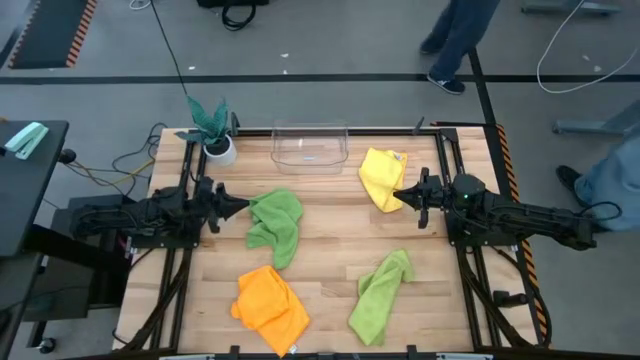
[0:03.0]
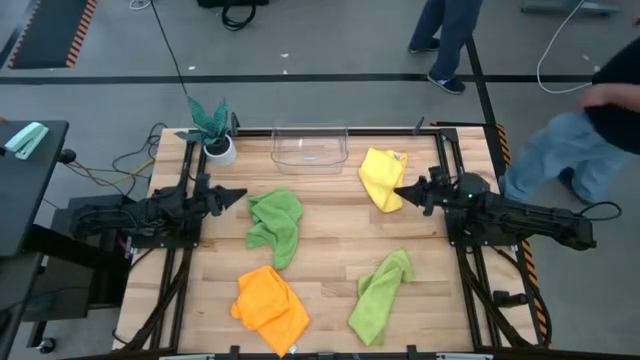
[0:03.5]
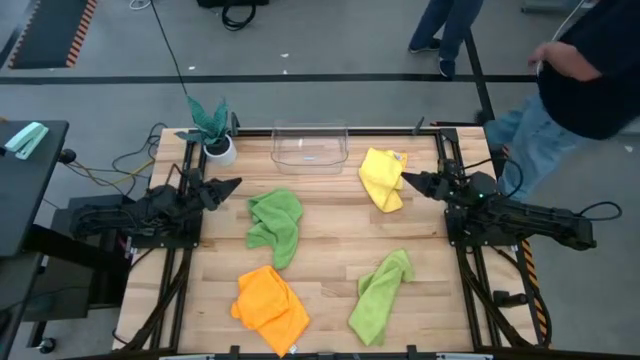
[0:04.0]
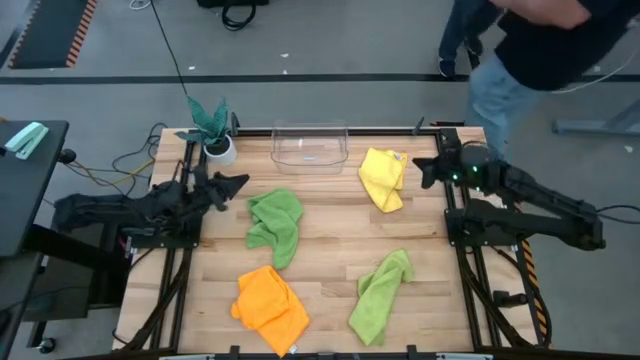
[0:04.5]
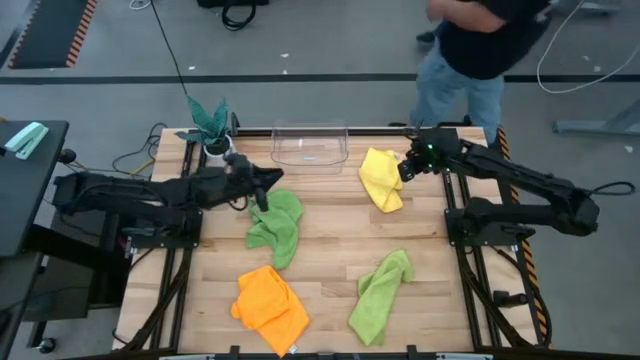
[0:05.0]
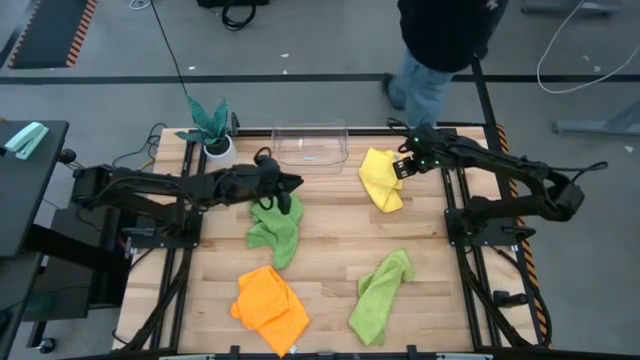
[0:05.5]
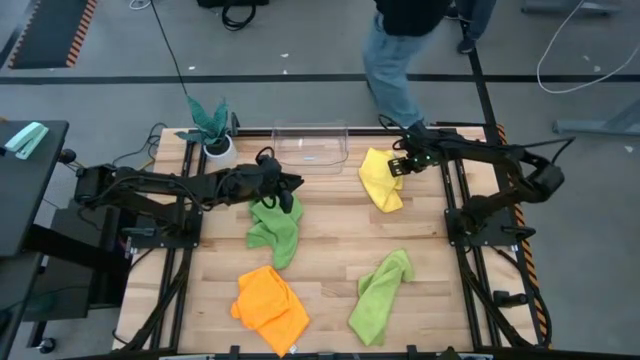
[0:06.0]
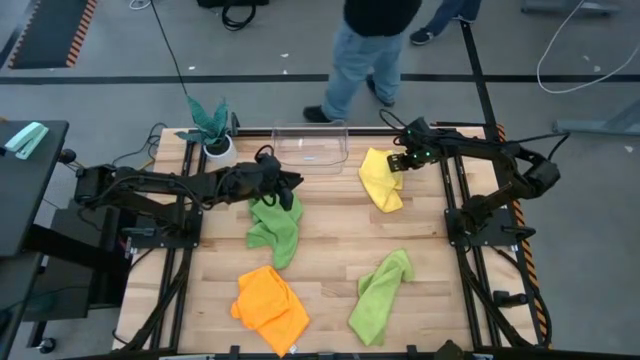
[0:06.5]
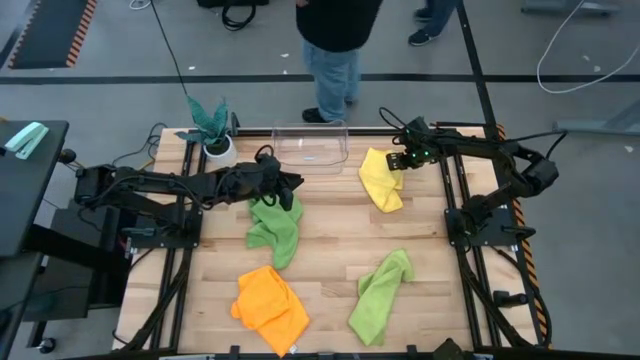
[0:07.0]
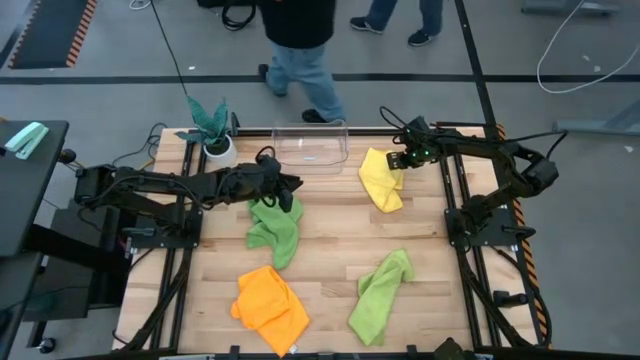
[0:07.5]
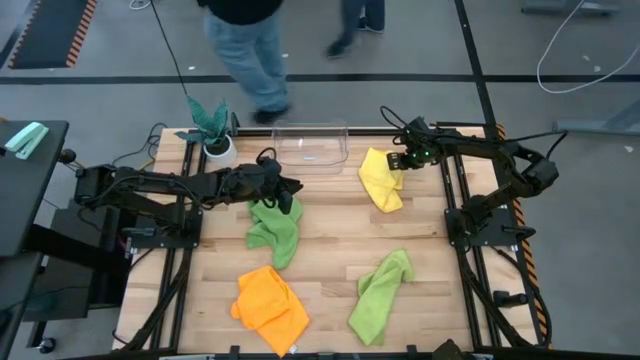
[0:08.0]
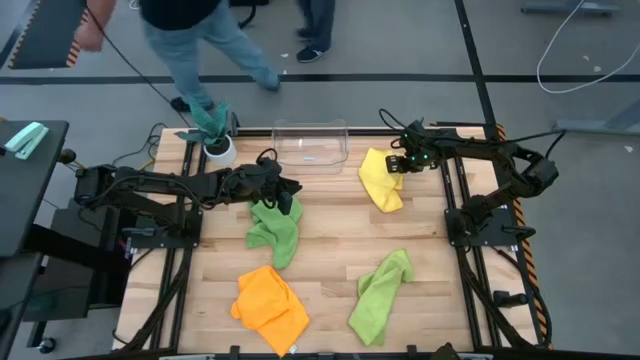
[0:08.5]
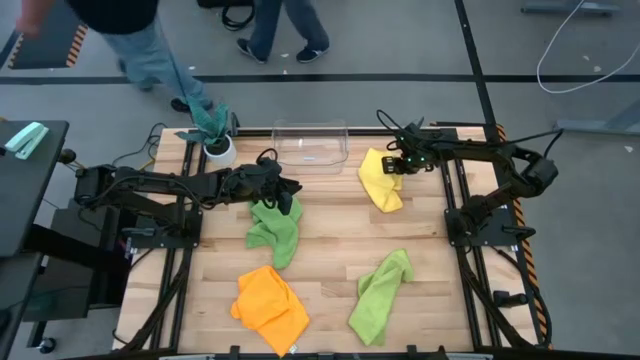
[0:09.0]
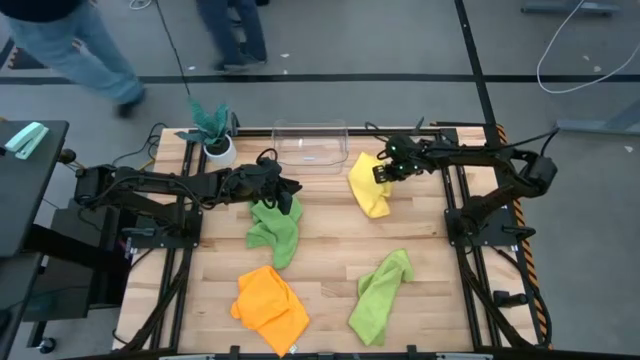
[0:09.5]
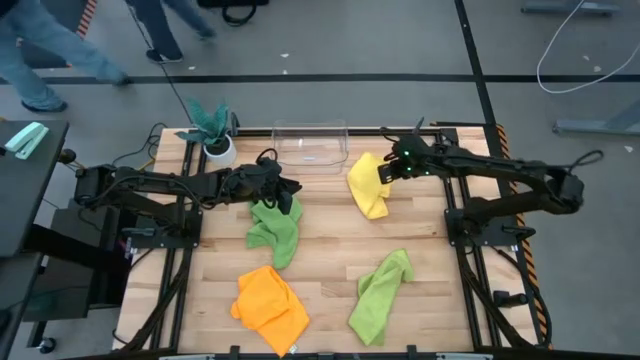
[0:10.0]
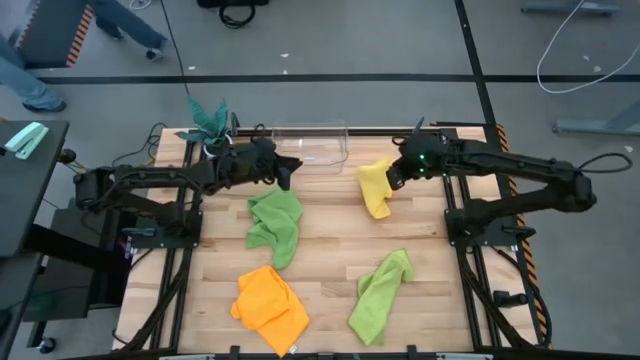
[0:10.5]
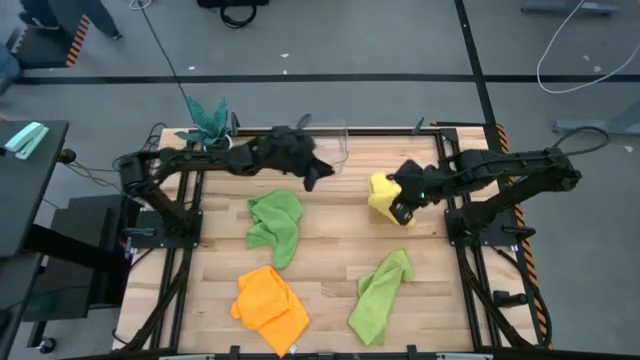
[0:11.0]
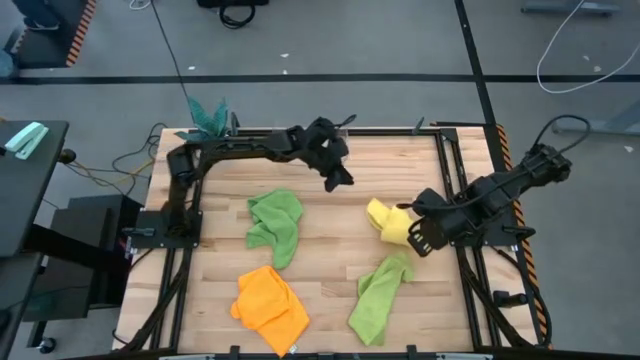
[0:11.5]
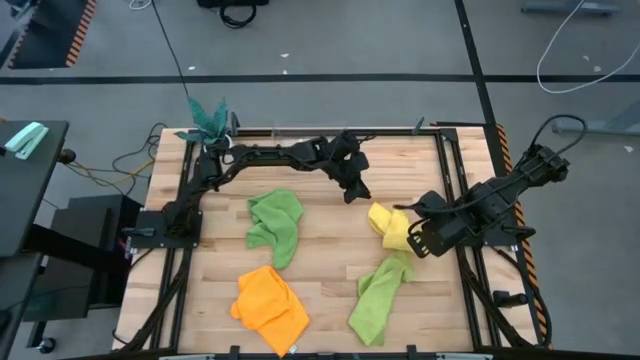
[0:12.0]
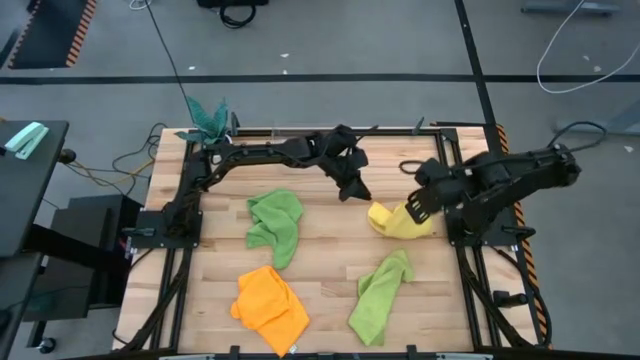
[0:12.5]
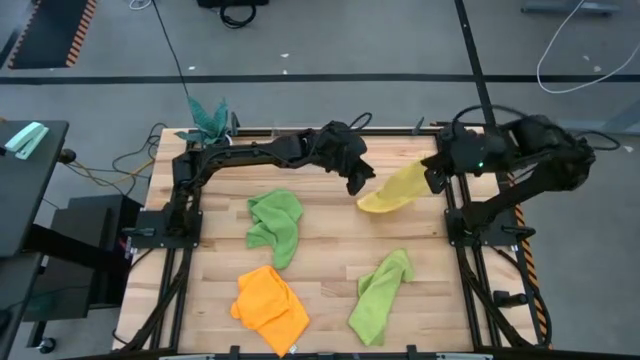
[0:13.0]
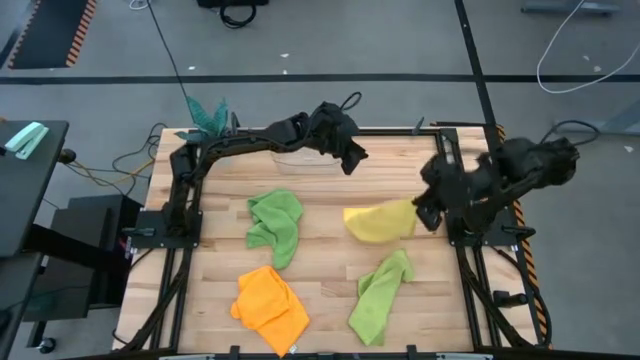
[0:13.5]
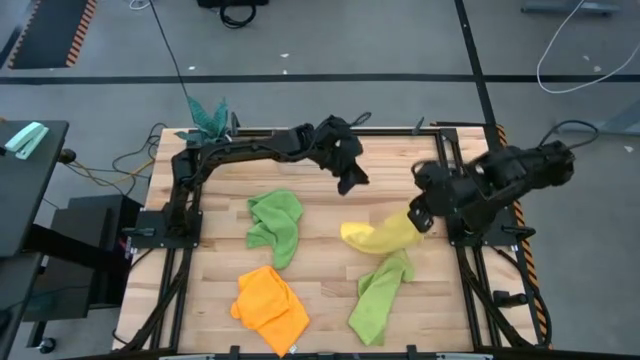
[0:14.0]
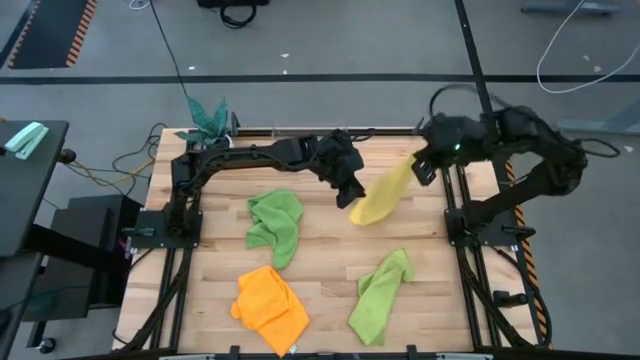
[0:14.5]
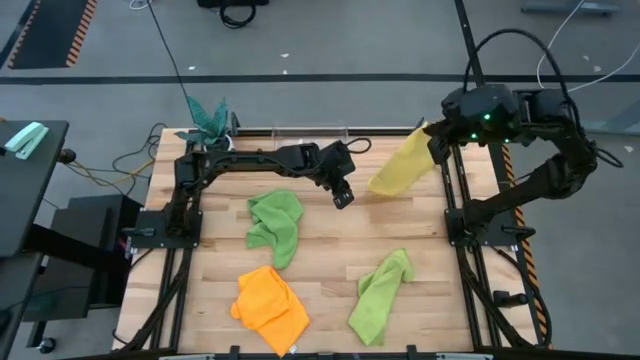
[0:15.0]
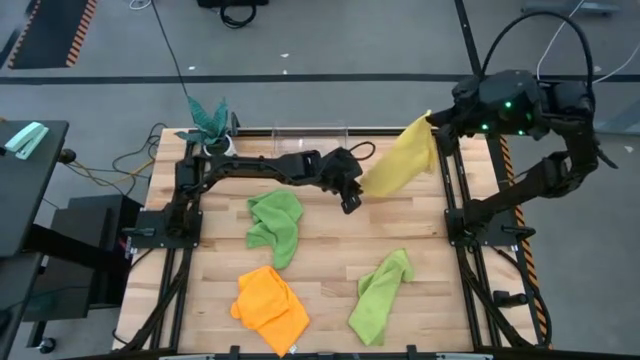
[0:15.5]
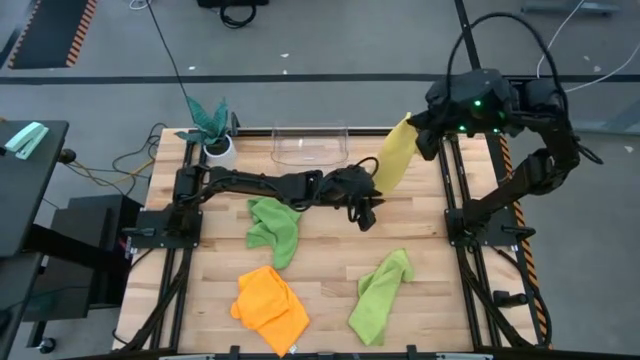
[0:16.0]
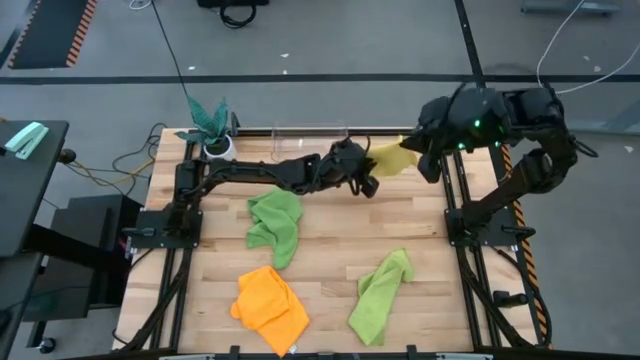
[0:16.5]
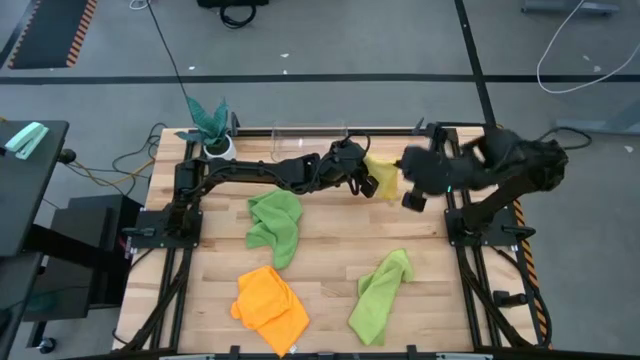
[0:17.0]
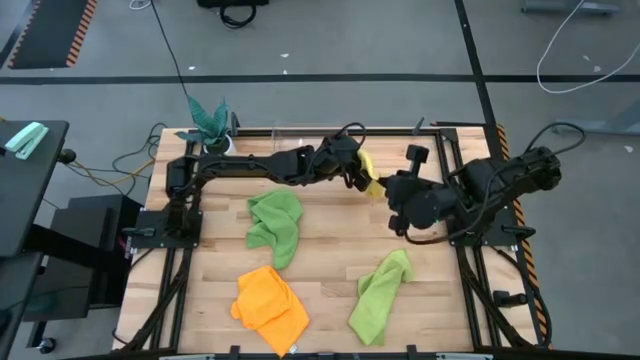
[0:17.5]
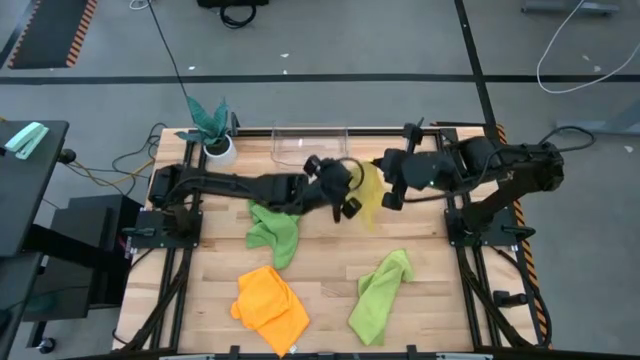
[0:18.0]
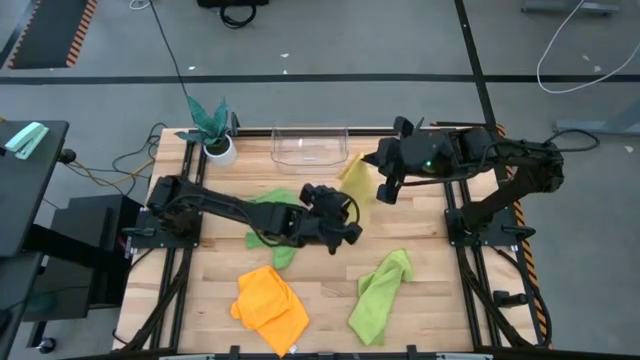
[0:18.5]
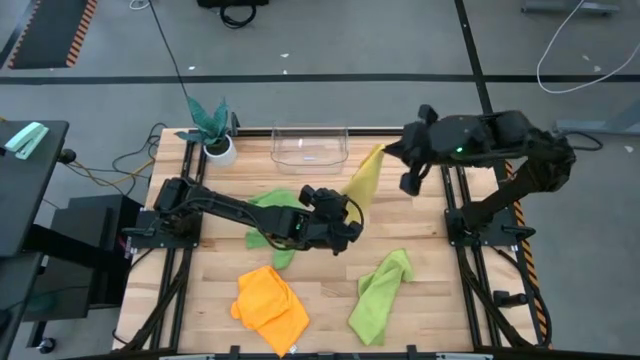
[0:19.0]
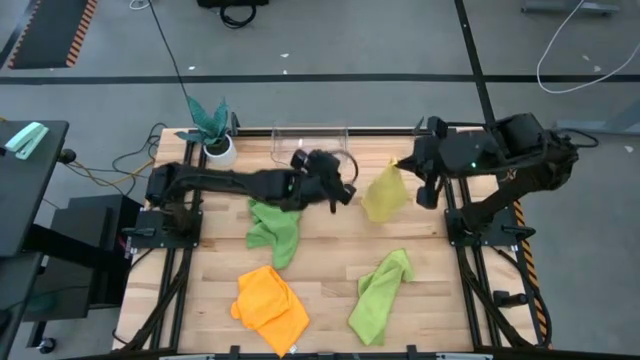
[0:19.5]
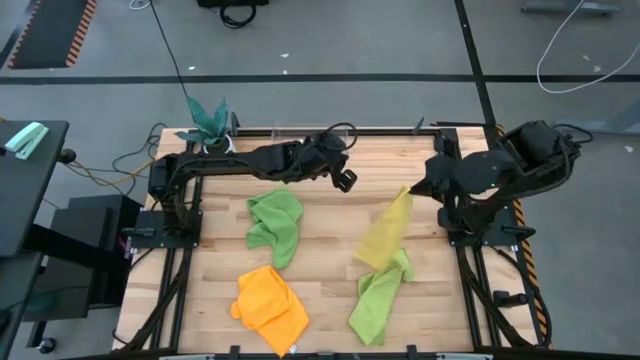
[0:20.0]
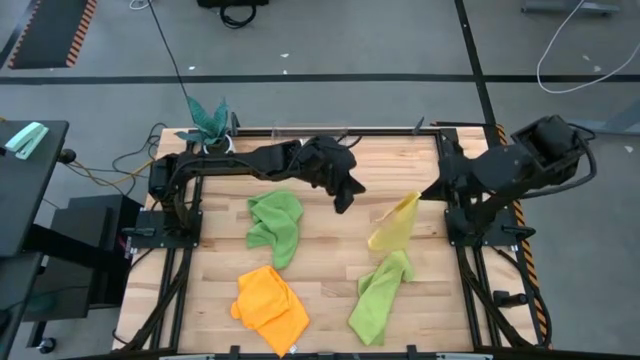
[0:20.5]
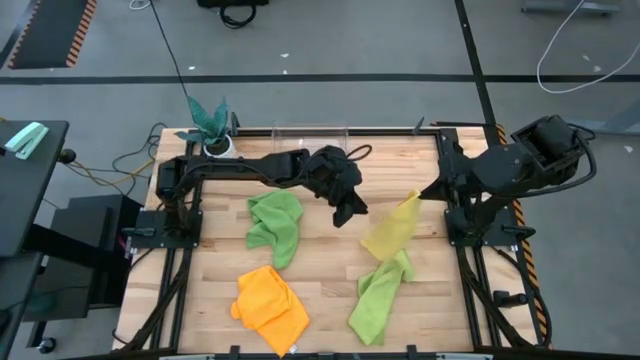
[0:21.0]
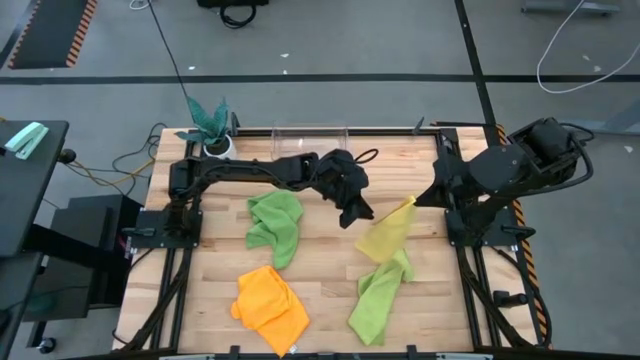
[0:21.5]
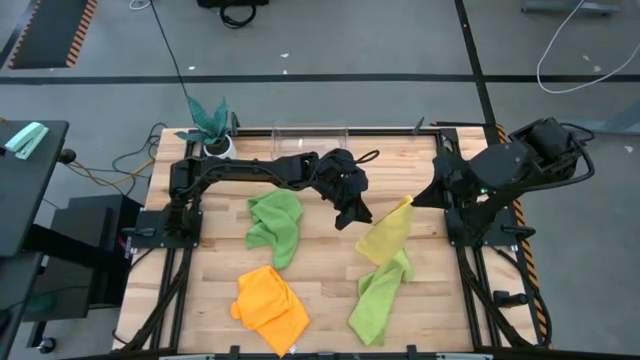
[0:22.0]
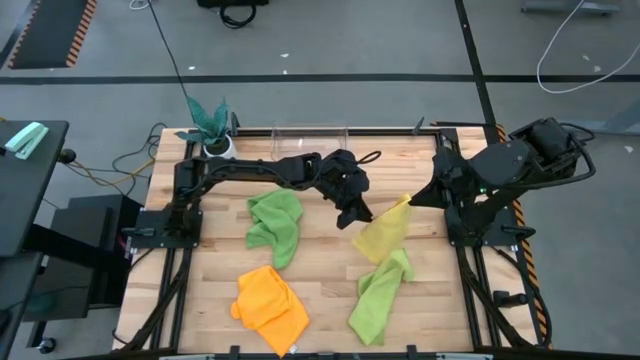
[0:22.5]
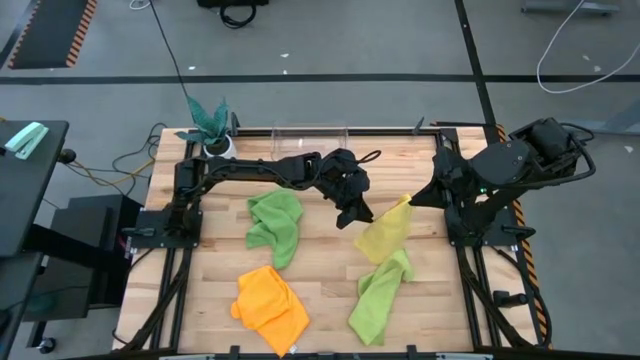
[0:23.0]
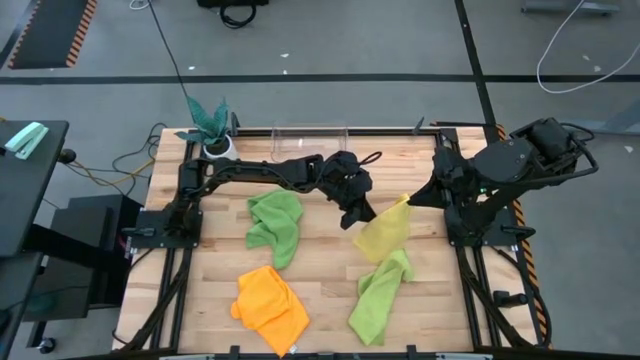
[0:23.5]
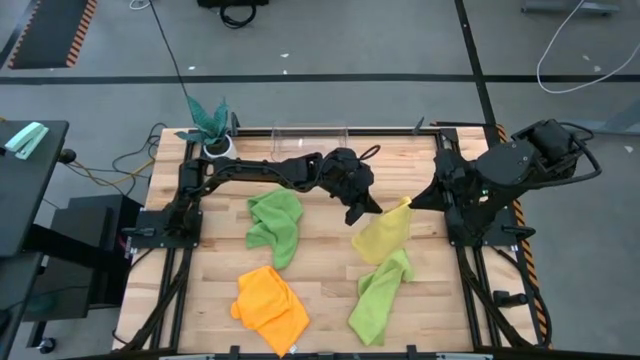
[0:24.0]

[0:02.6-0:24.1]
Task: Fold microfiber towels
Fold the yellow towel
